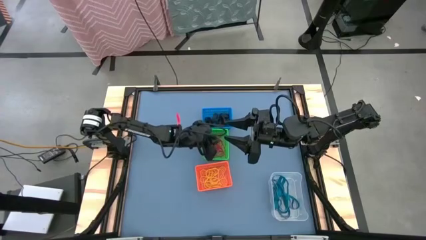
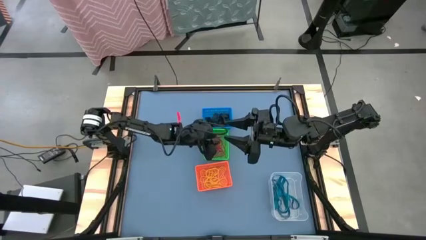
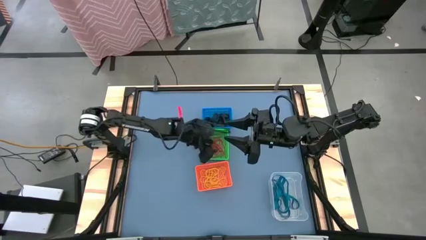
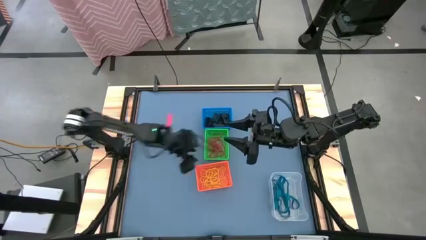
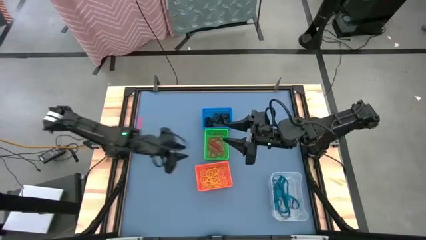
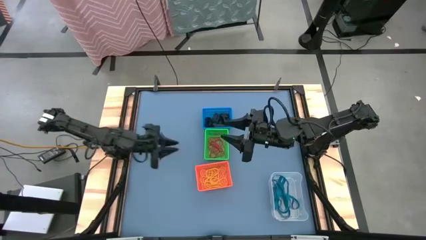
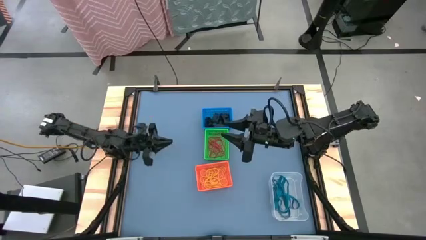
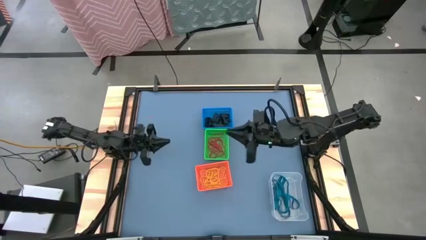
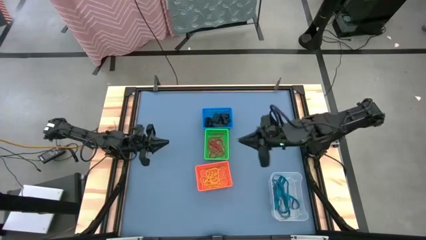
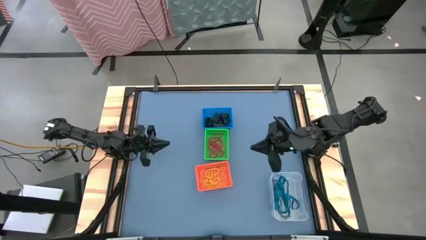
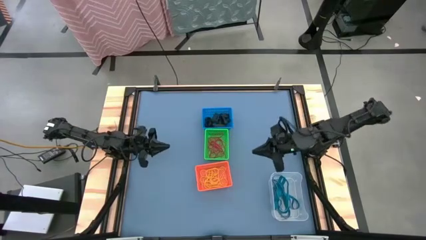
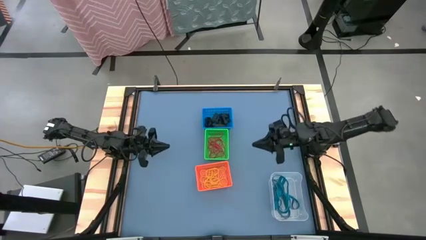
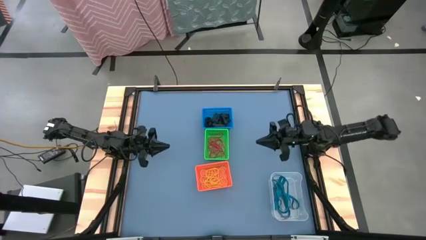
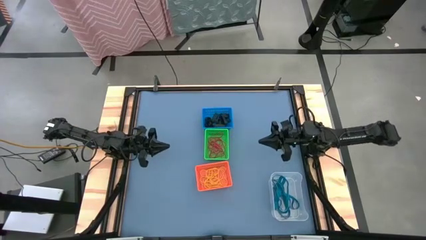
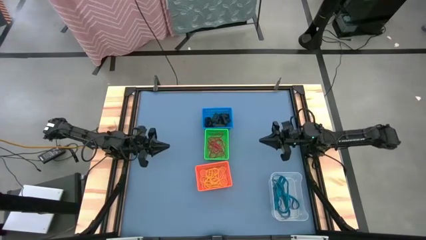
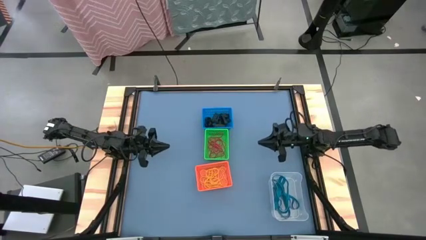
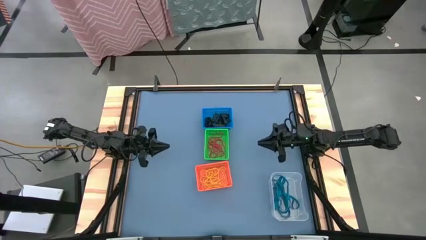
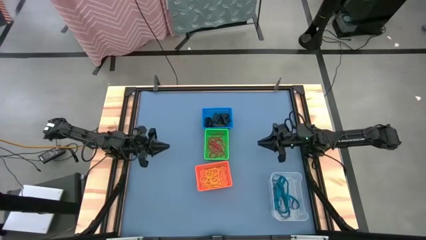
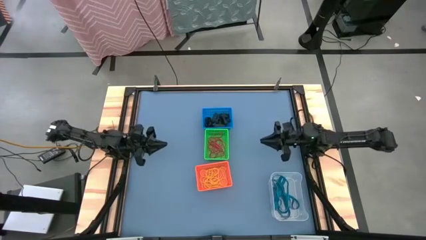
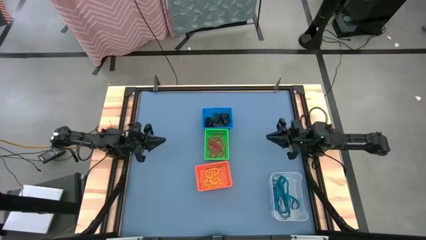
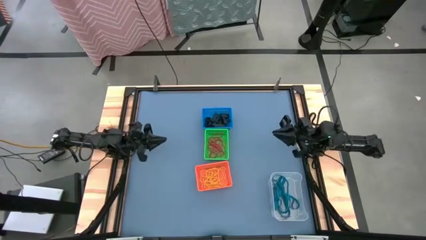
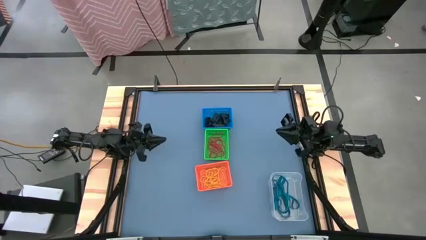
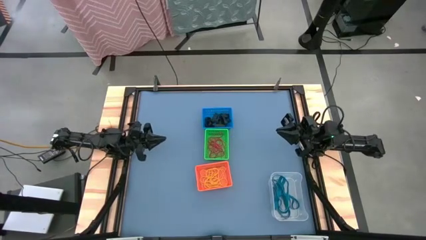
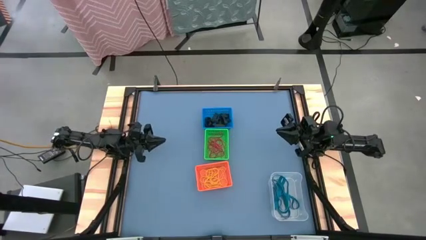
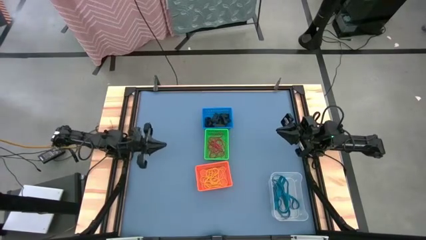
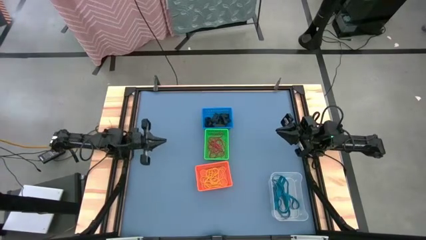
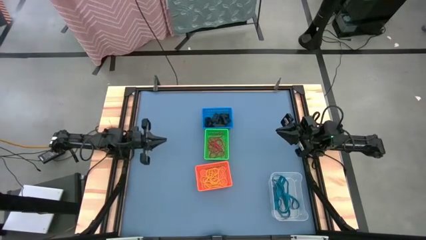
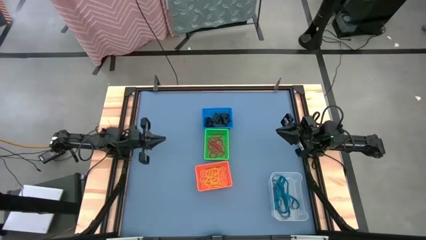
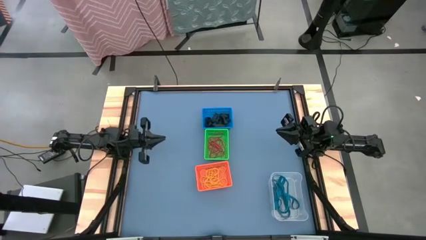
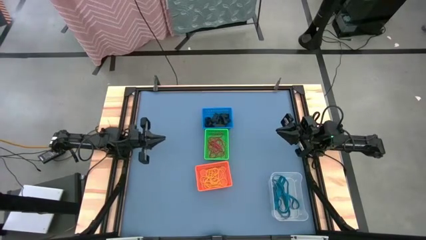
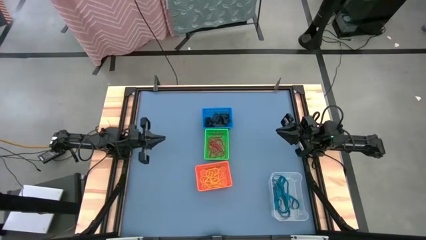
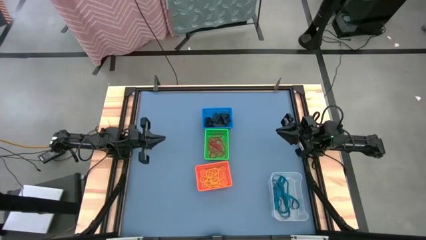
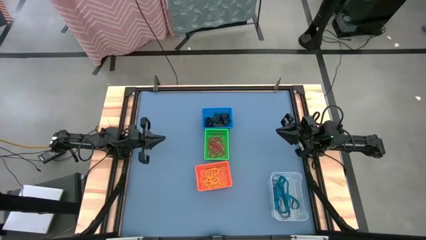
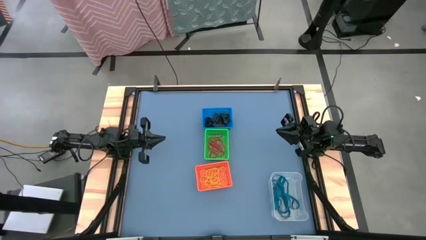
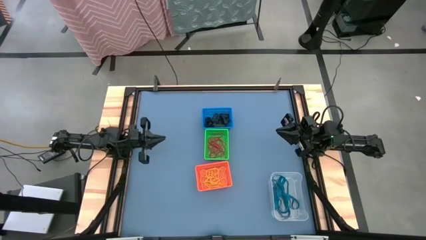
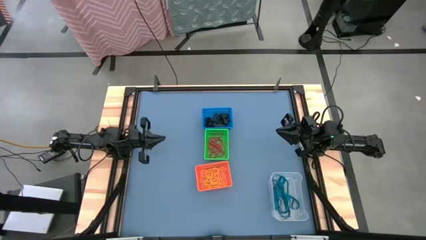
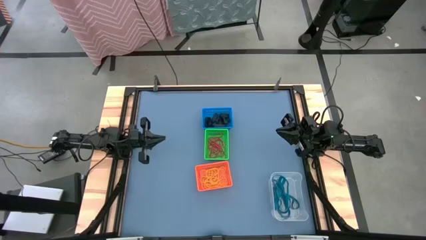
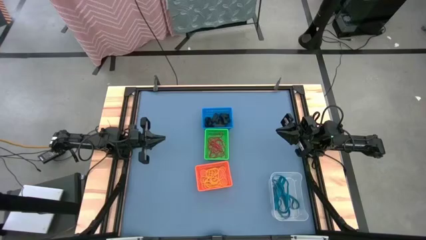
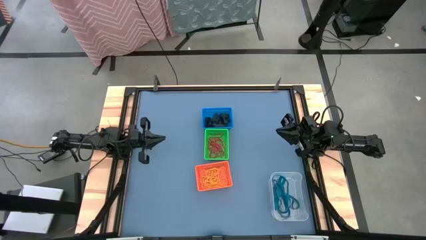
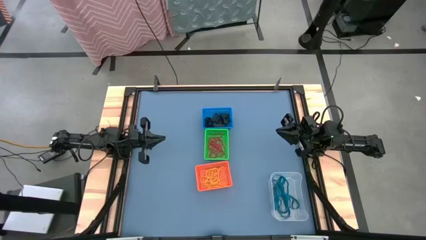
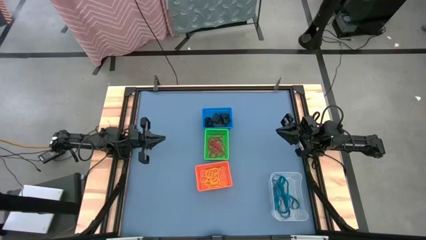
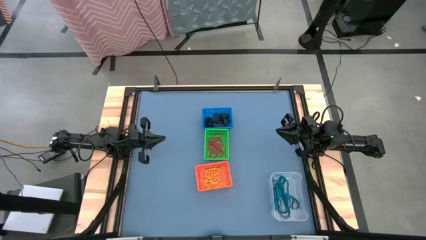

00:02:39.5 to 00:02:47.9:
Task: Sort rubber bands into baskets
Return to Home Position

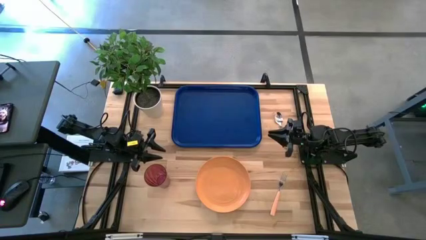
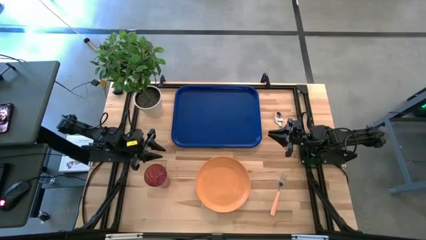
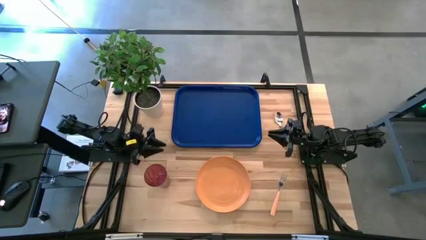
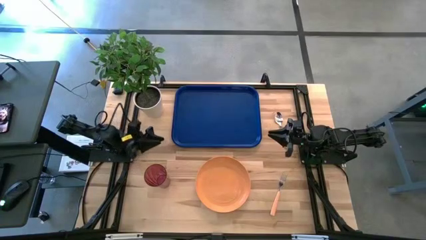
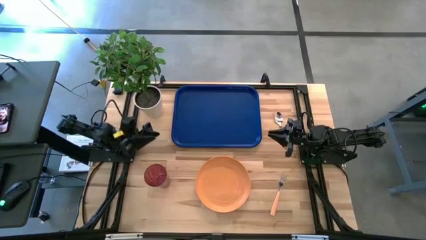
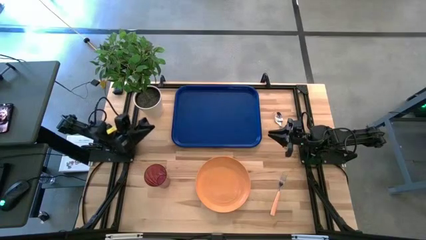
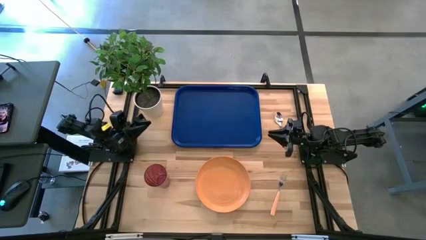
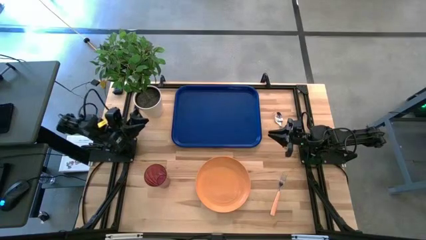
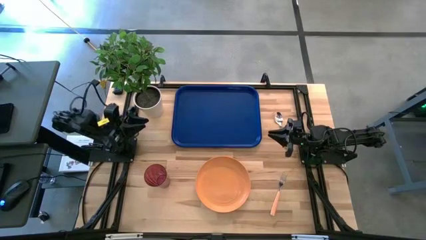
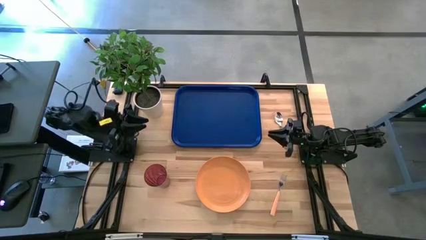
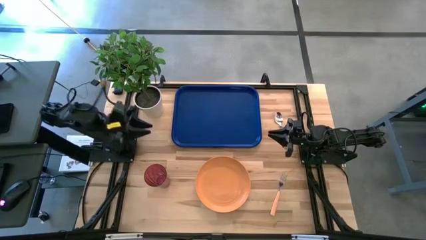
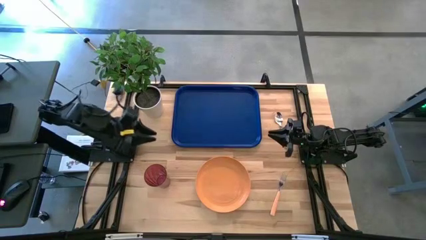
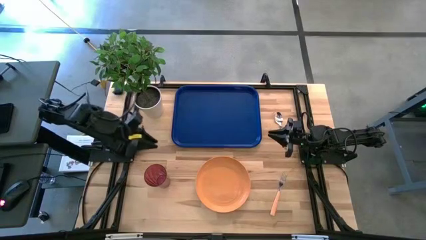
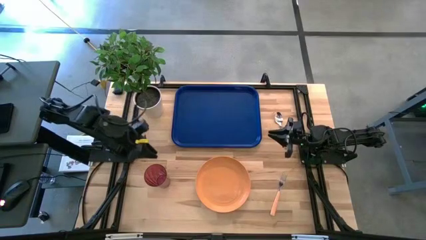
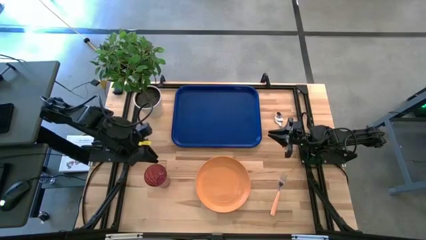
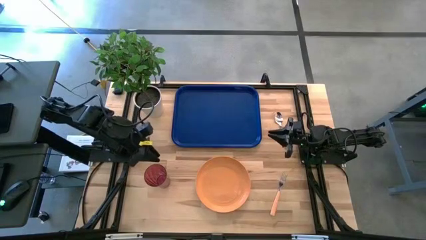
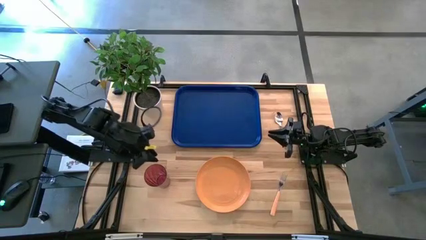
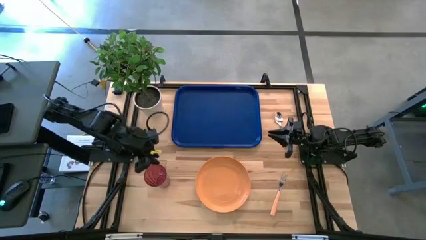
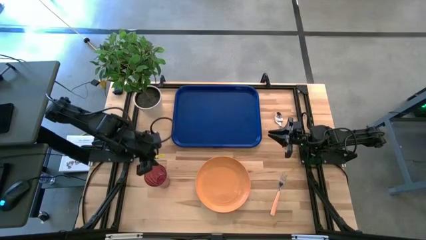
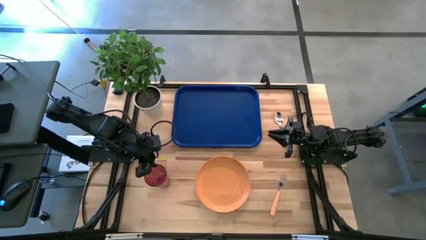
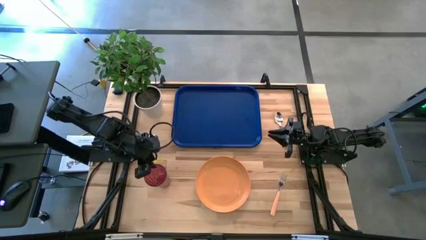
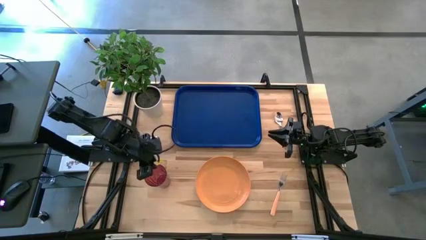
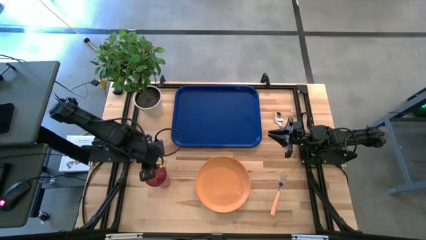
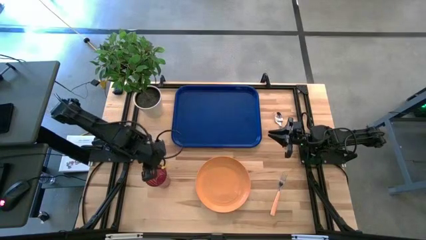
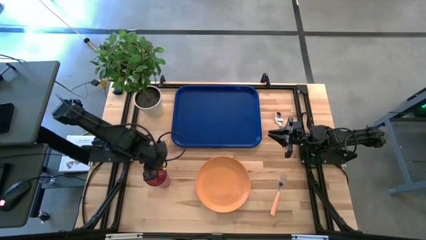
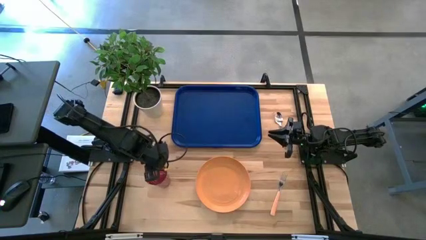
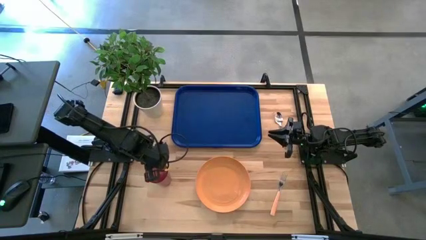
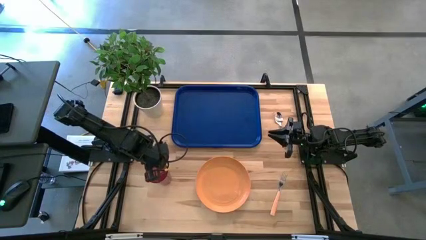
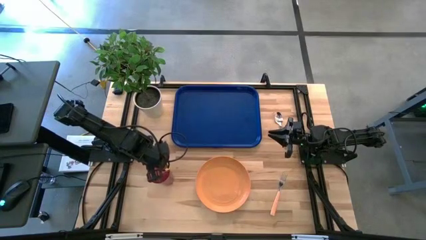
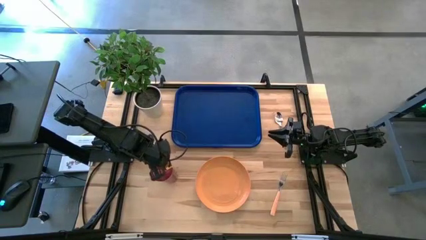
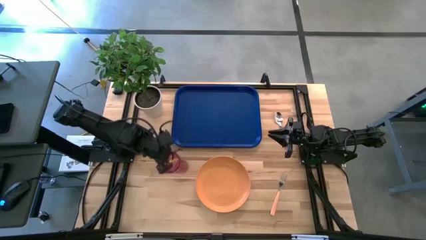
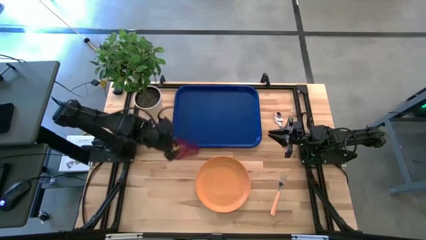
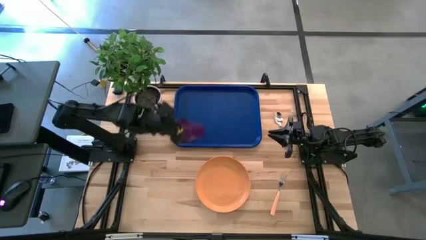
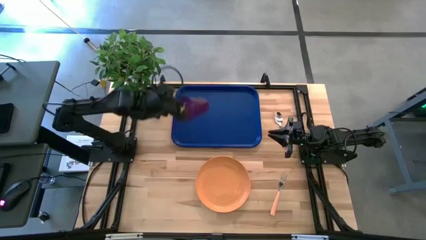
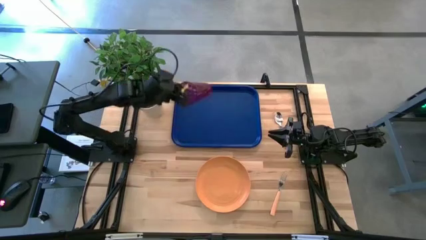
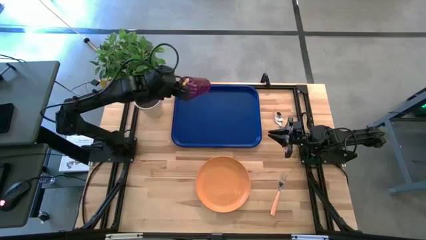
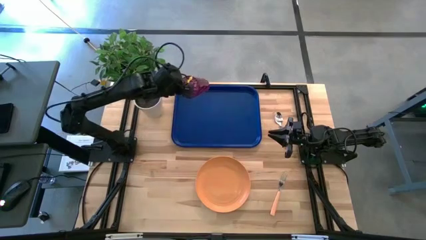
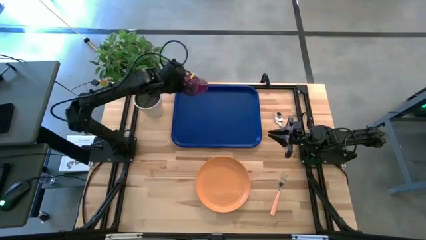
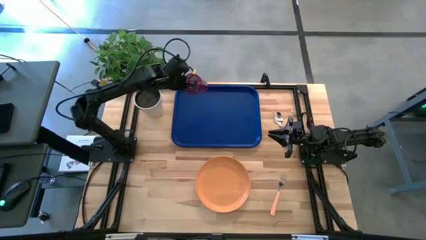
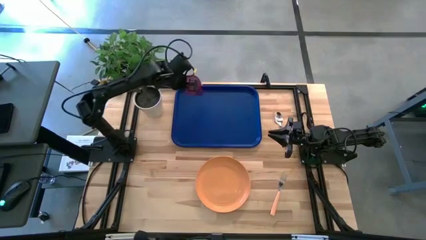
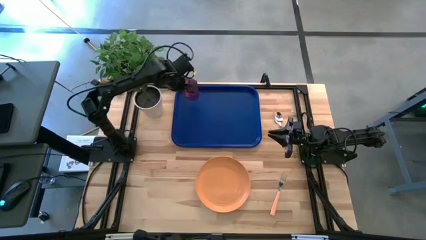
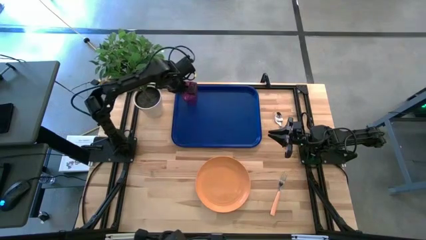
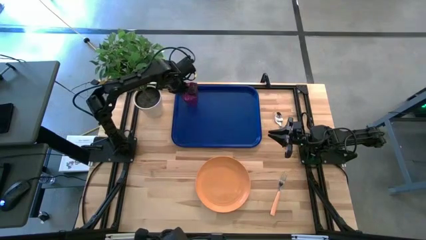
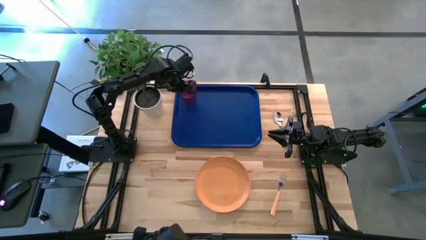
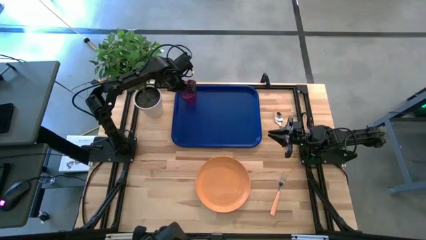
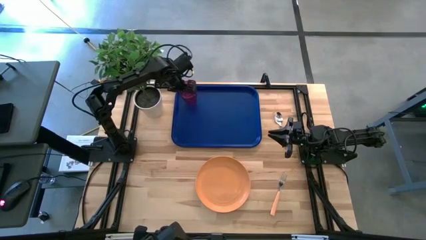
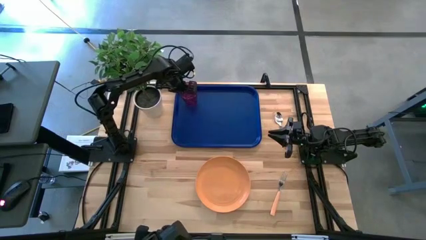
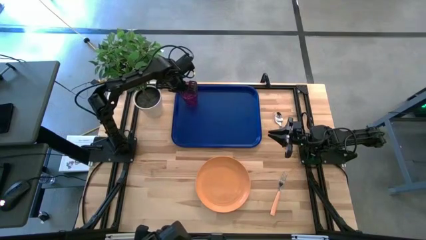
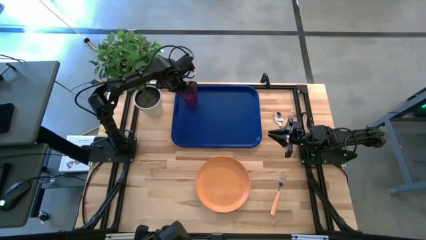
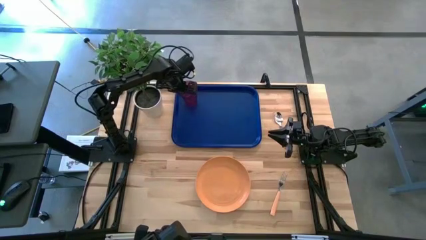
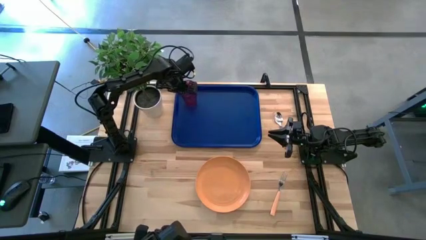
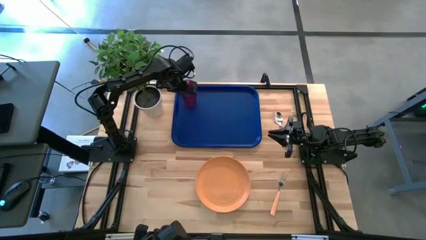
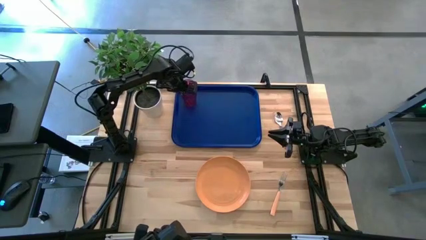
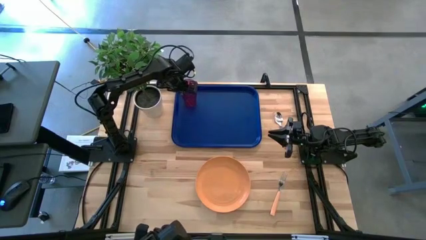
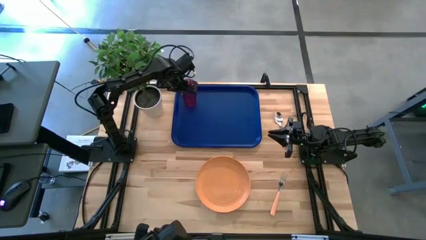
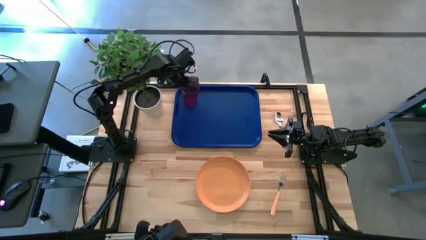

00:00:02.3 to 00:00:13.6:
Task: Pick and place plate/cup/fork/spoon on tray
Put the violet glass on the blue serving tray
